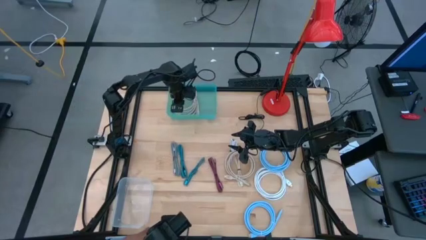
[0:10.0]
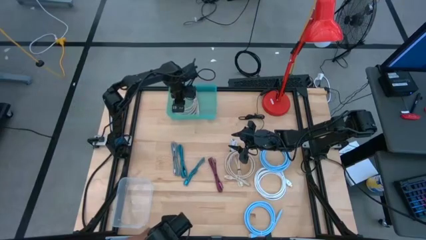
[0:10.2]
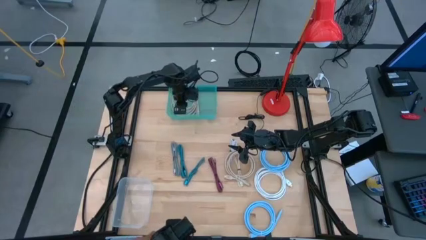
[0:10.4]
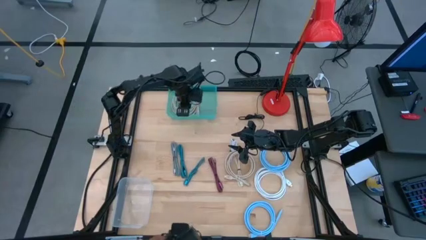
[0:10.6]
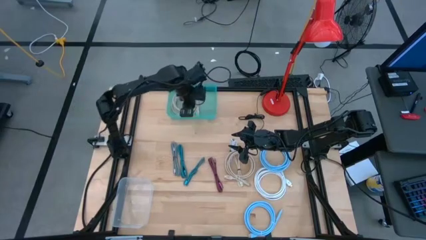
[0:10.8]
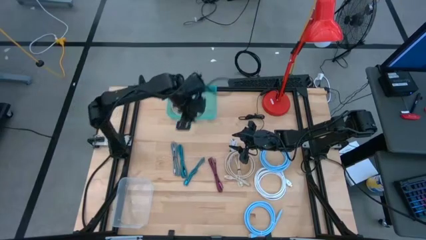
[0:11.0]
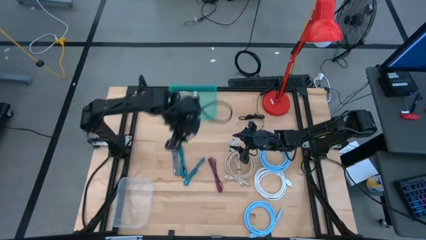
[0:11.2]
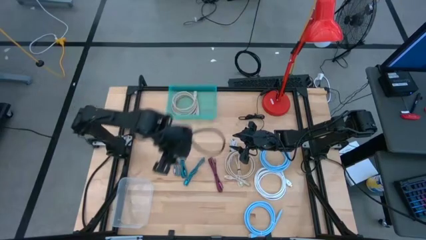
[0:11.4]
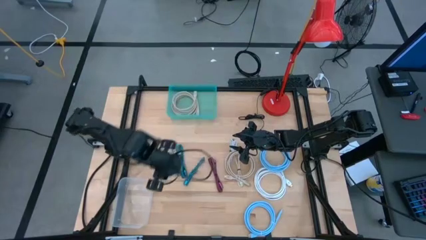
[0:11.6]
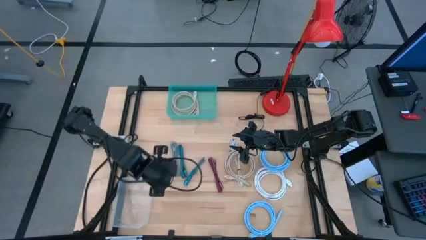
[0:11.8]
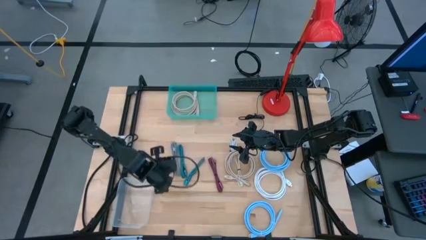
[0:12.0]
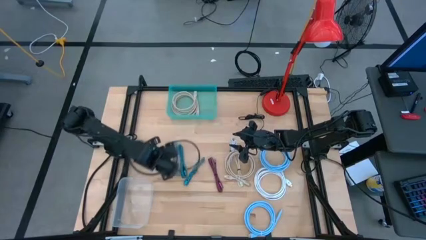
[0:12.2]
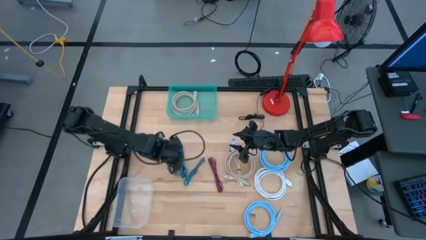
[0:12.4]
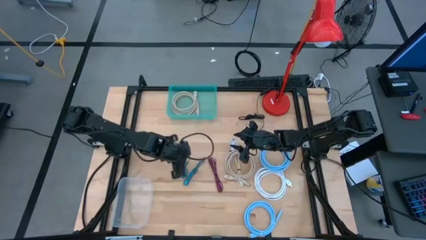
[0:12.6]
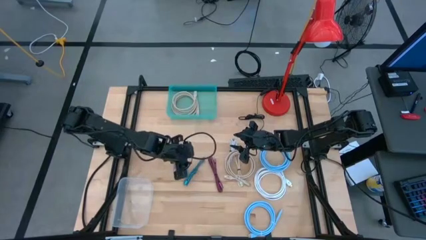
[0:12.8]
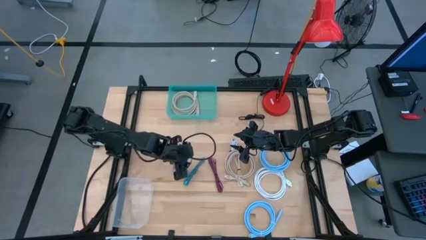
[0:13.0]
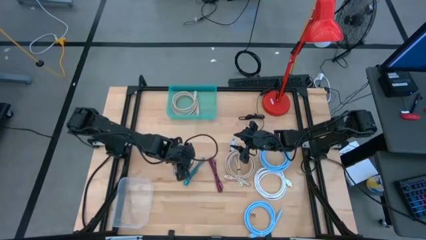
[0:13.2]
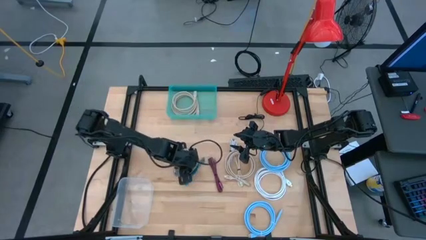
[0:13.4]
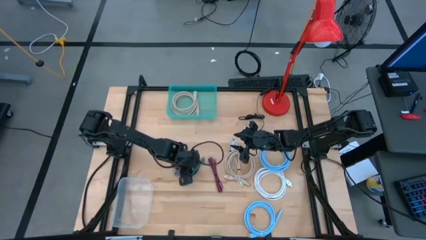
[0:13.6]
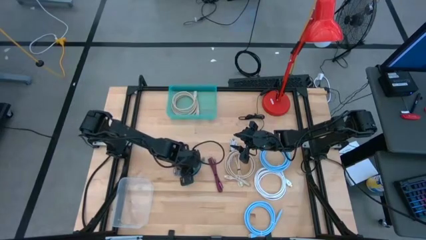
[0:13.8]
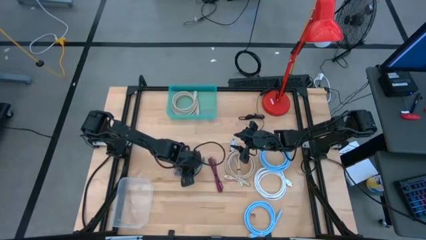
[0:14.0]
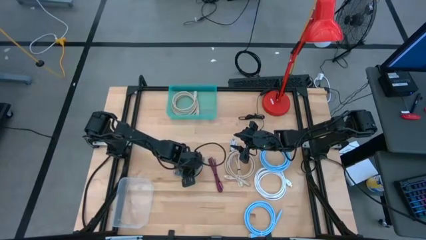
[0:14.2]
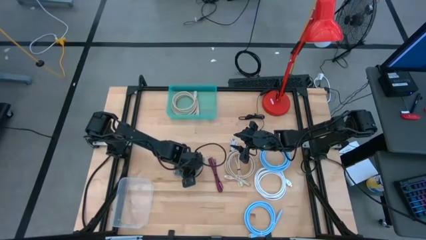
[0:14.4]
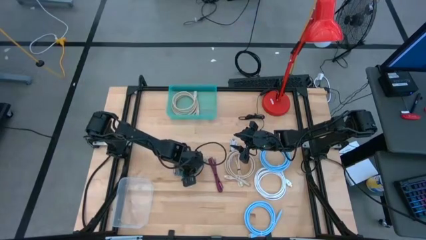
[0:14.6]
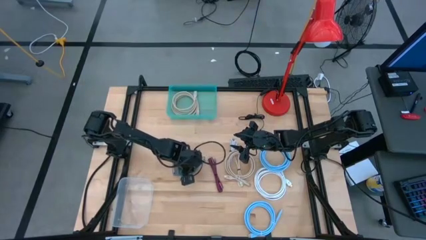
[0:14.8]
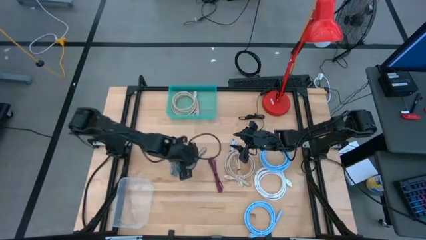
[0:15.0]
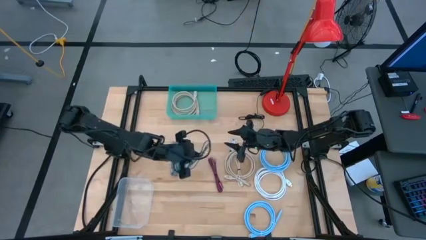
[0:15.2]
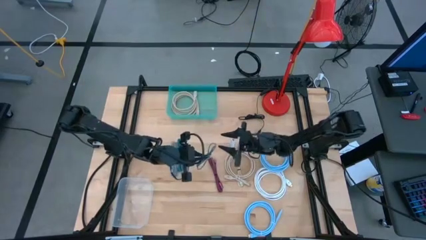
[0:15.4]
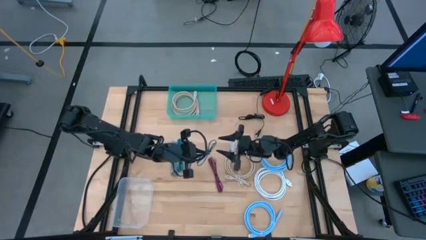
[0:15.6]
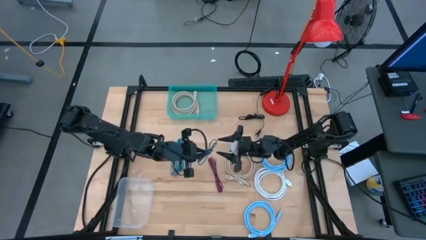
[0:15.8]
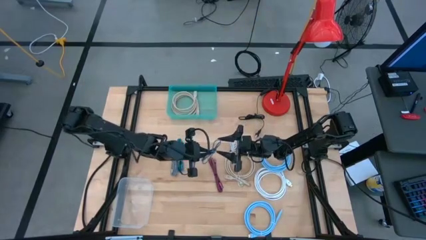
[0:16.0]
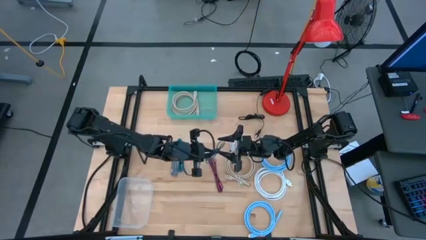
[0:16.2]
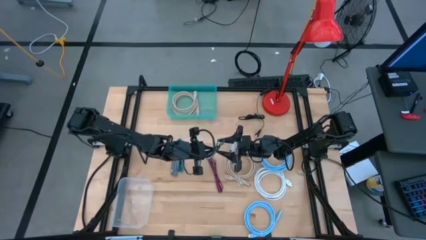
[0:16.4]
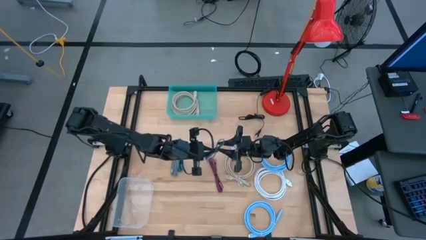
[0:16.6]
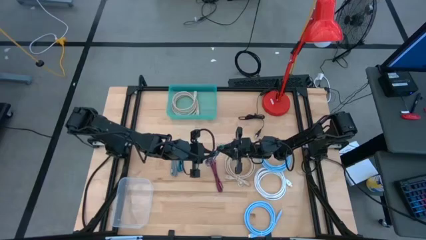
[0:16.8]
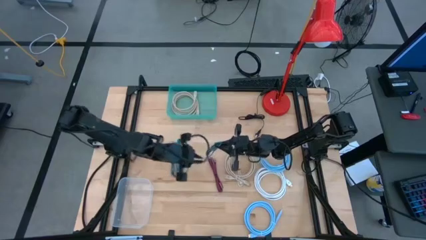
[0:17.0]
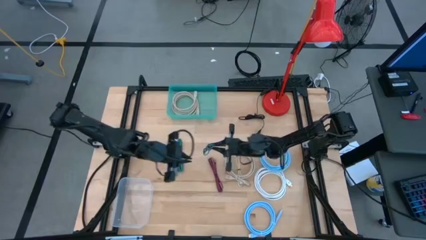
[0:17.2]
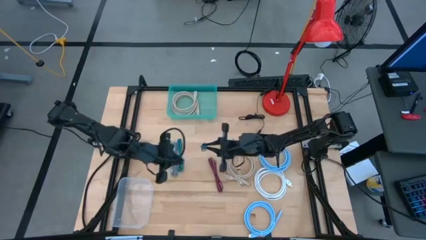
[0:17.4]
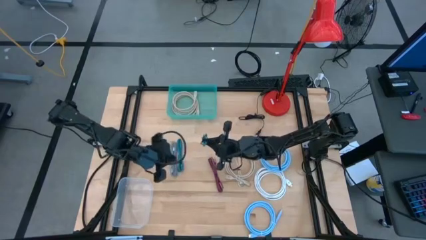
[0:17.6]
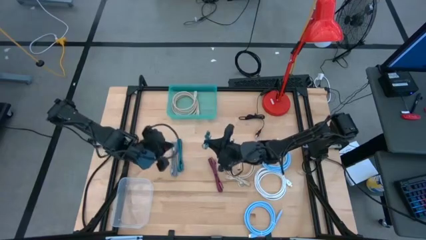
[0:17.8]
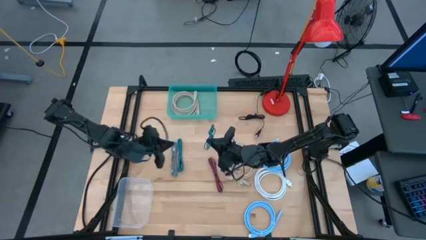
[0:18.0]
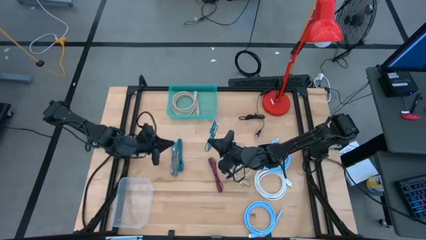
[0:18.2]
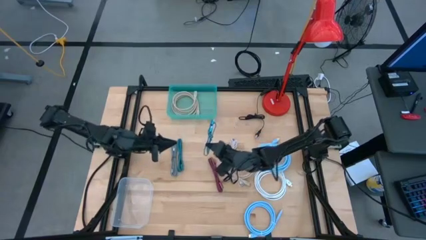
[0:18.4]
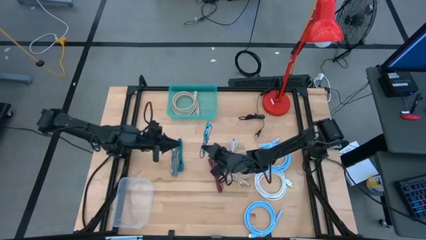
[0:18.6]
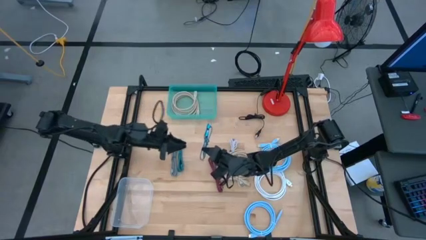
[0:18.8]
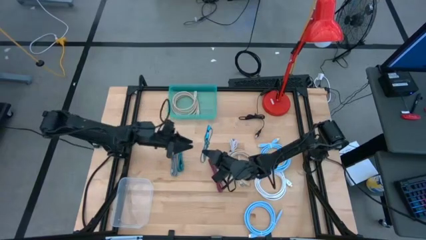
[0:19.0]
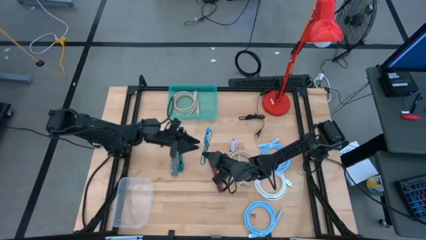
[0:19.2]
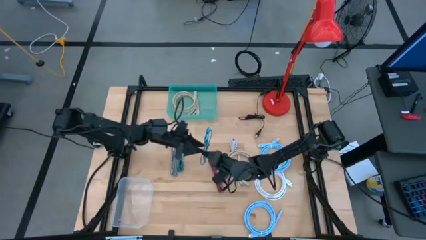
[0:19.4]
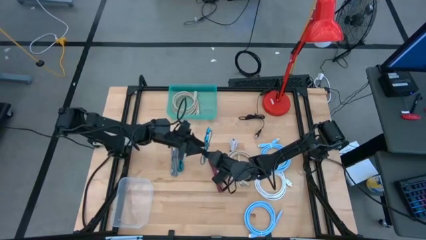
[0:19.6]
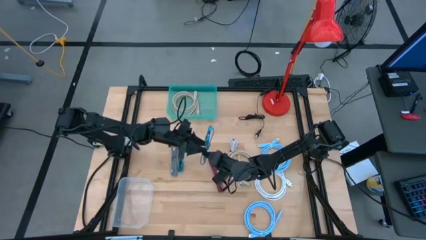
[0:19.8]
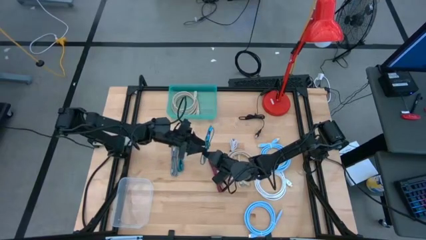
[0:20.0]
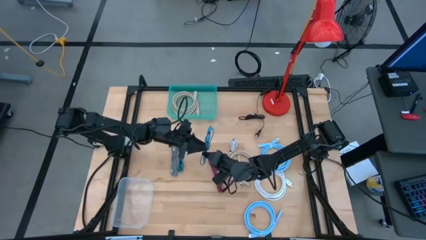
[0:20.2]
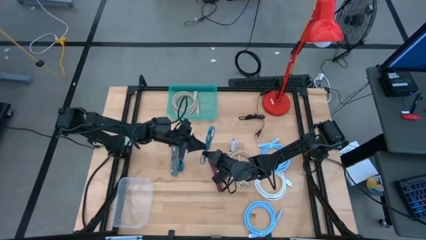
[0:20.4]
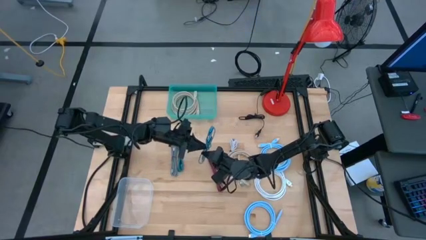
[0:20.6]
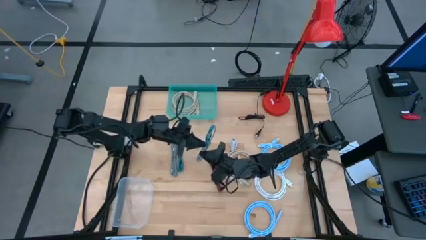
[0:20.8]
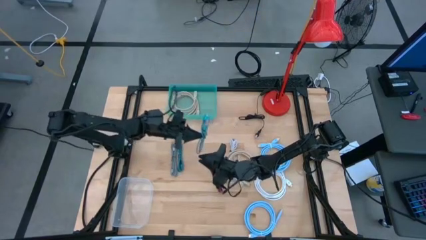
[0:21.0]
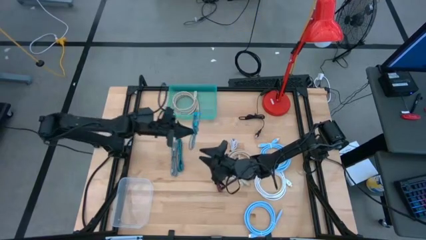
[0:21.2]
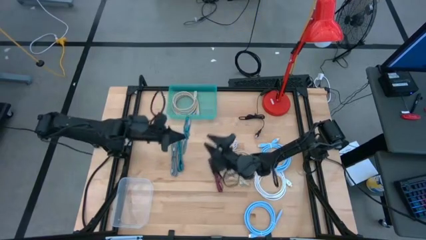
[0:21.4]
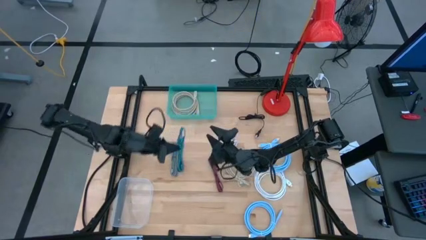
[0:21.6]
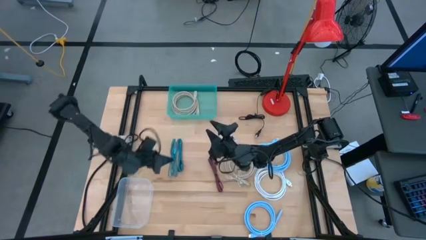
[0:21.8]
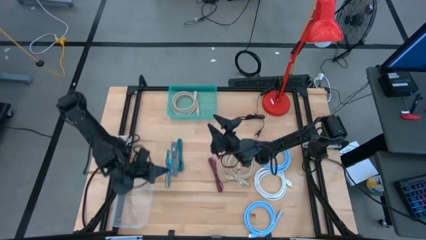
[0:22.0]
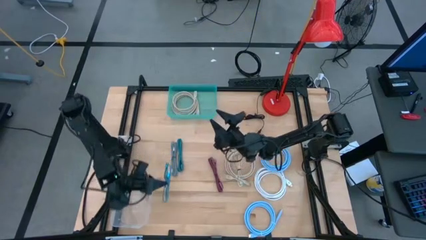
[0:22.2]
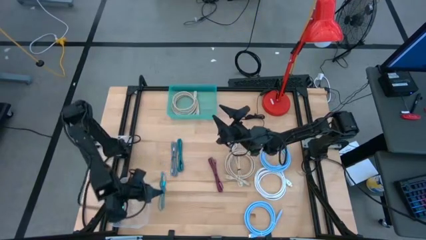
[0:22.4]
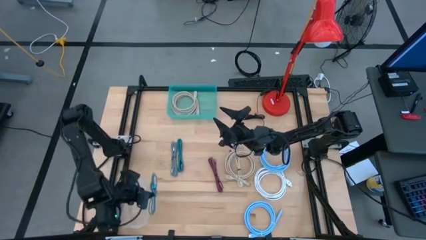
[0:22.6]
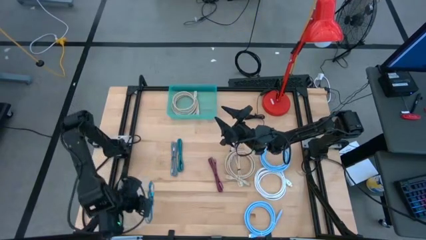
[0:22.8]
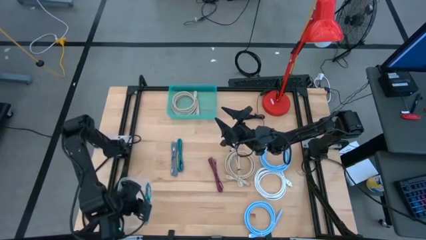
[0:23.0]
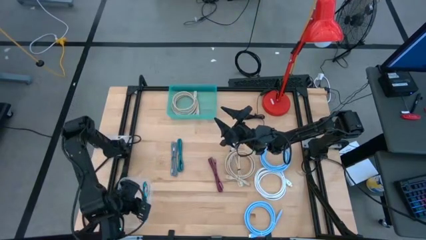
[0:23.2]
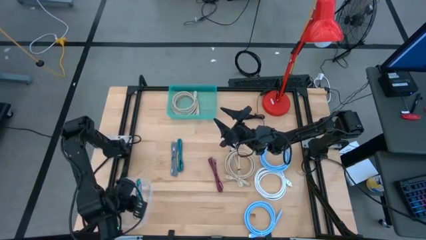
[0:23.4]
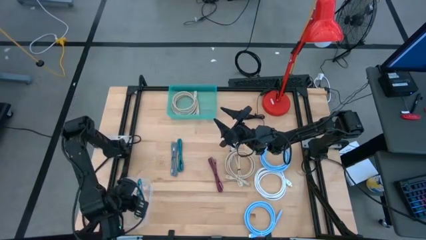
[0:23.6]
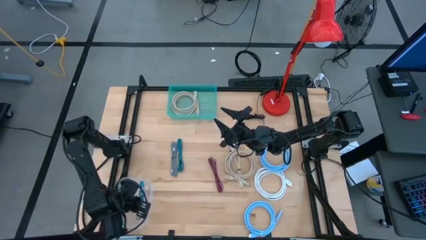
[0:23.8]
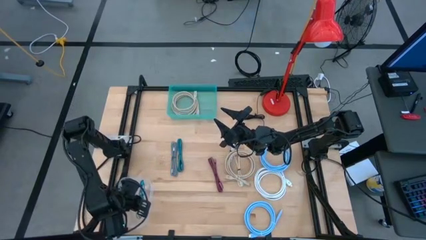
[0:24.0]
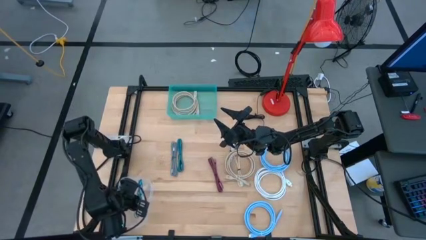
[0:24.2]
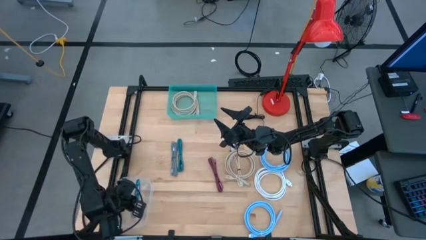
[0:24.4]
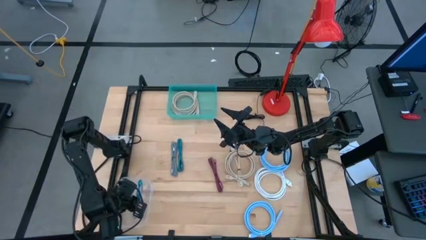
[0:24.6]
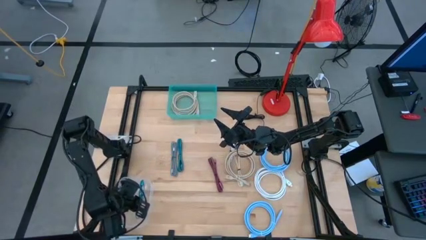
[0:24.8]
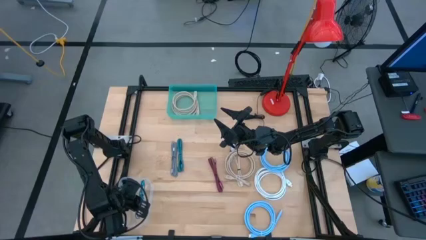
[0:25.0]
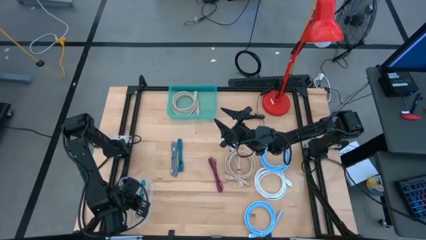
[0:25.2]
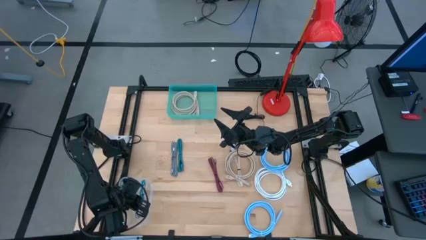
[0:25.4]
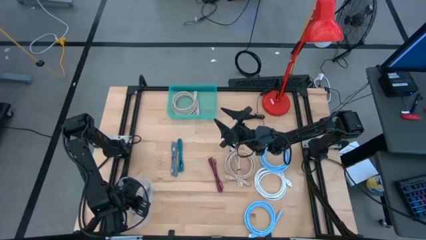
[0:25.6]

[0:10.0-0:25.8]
Task: Pick & Place USB Port
Put the right blue black charger cable into the transparent bin
